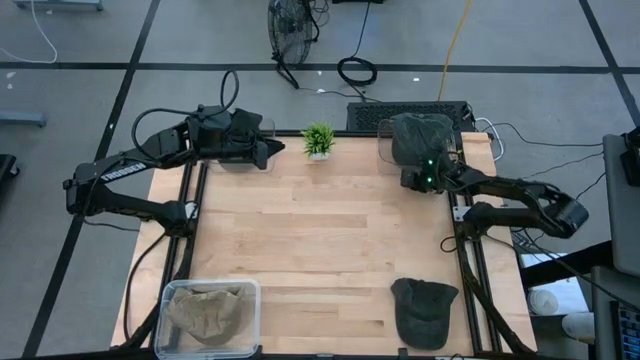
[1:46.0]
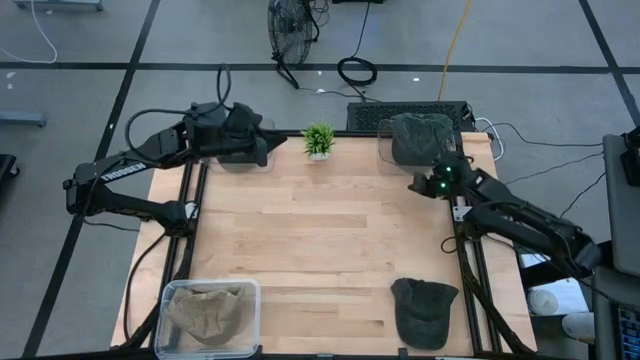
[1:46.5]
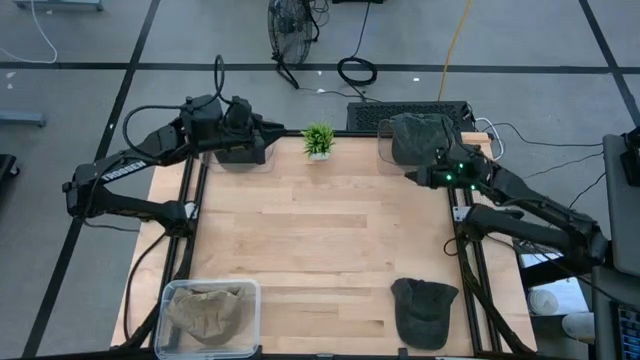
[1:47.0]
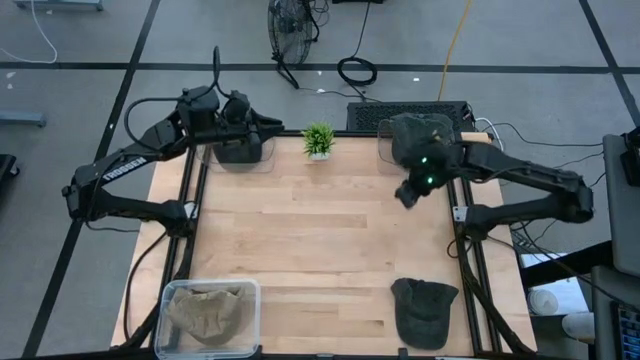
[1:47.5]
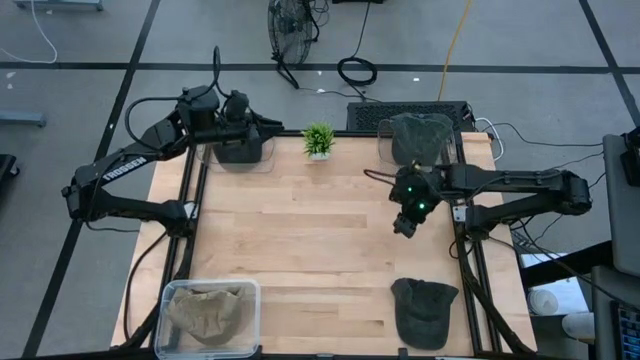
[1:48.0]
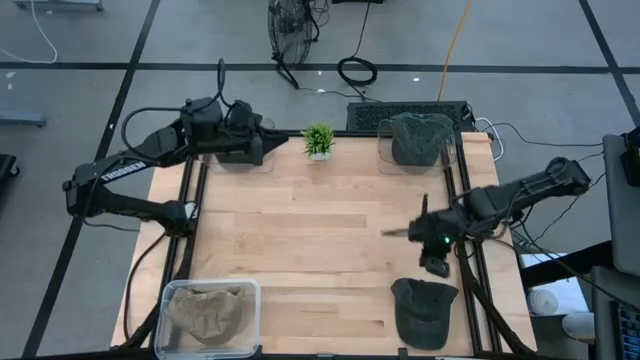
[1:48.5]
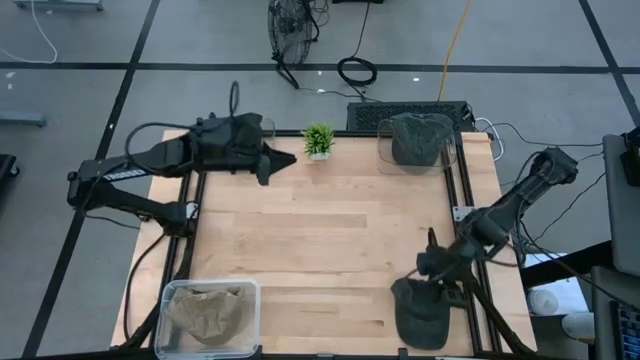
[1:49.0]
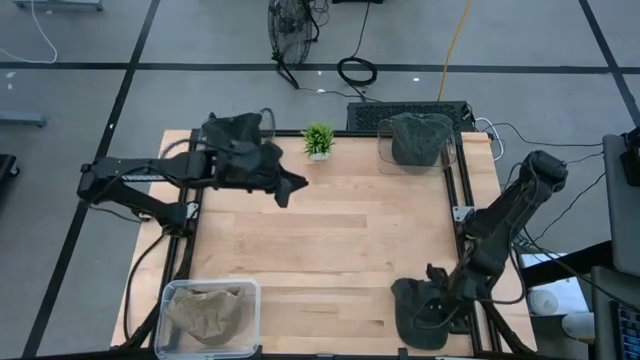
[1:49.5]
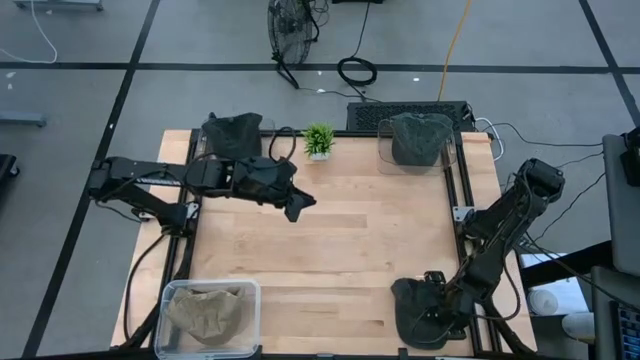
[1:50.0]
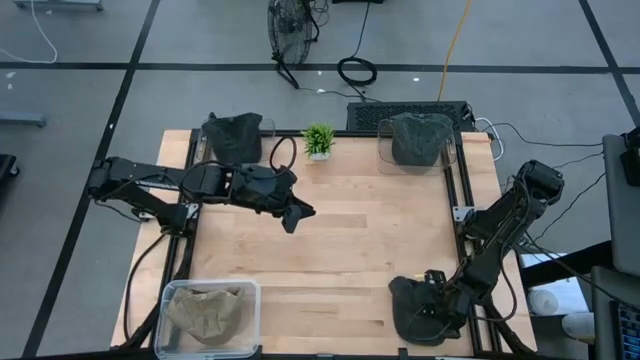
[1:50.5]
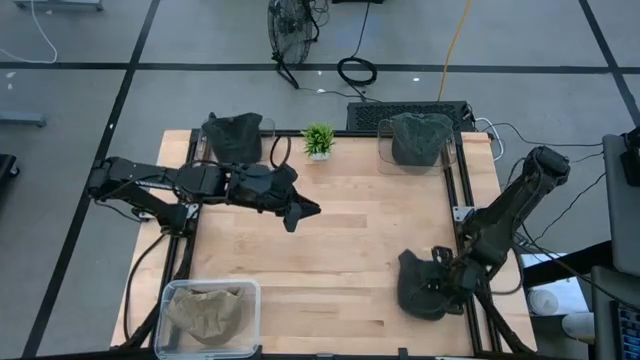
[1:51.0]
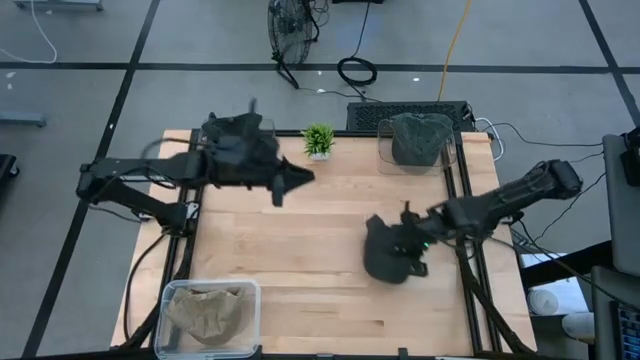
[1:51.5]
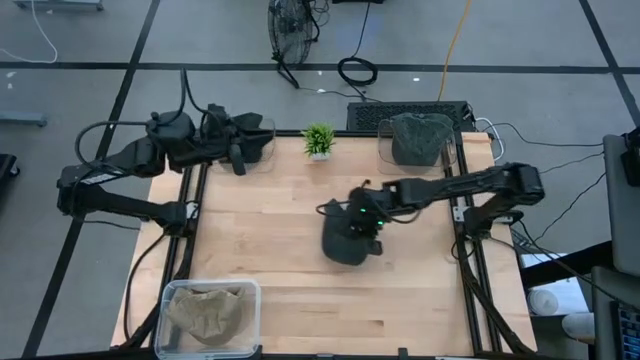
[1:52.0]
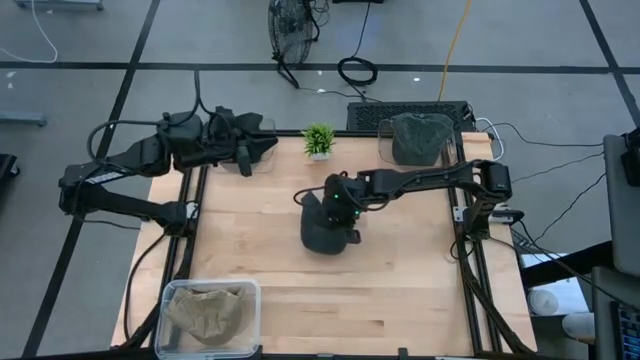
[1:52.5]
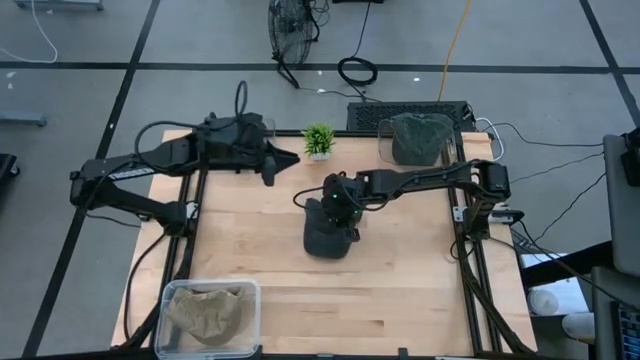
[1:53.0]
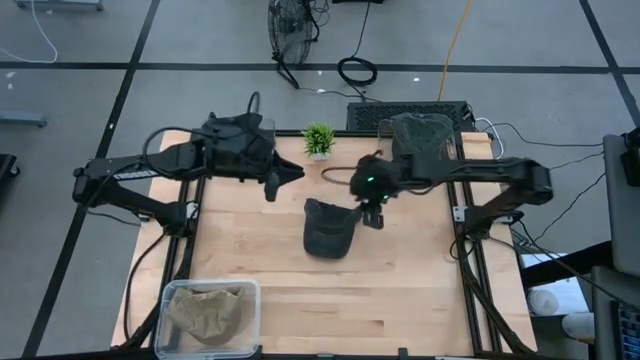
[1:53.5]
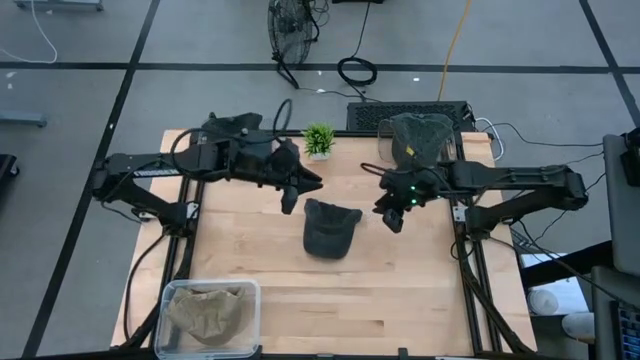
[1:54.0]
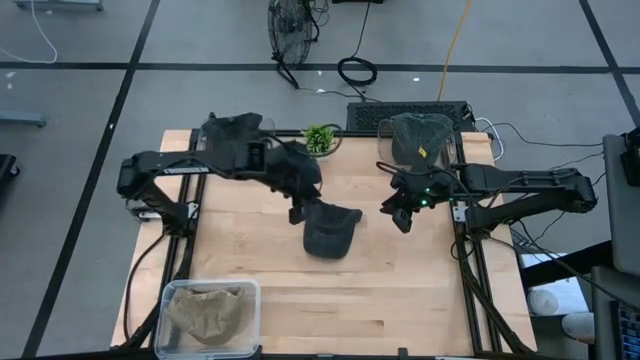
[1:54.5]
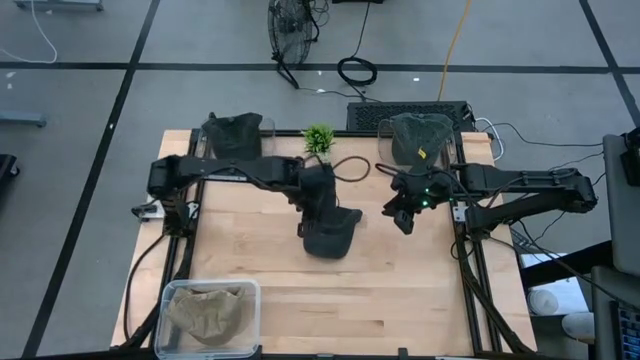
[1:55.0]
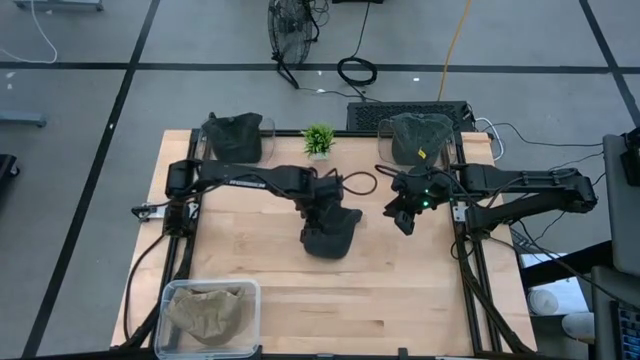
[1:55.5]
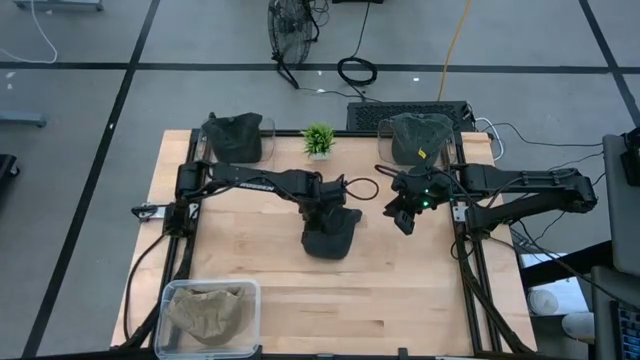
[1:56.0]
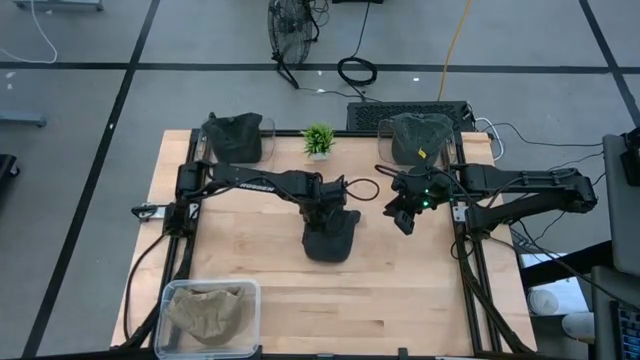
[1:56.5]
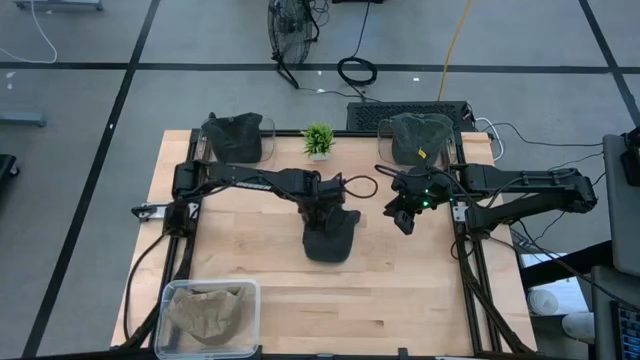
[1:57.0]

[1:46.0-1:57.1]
Task: Pick & Place hat
Put the black cap into the left transparent bin

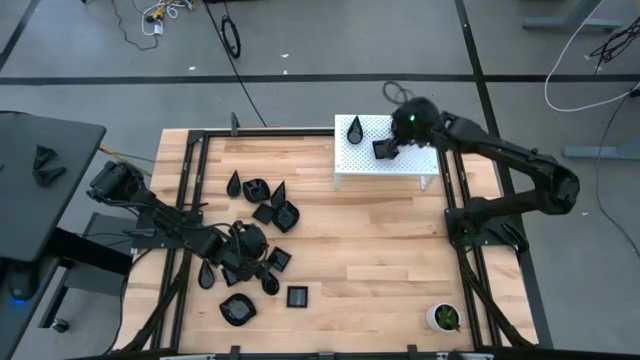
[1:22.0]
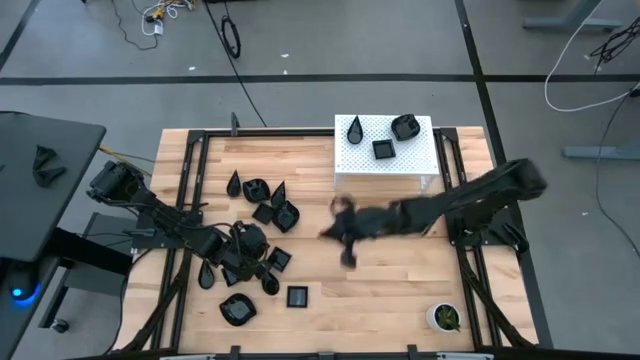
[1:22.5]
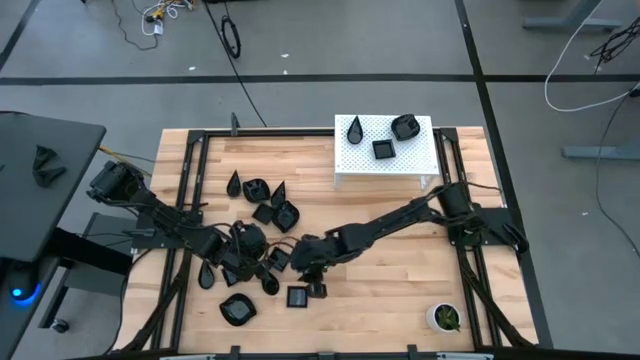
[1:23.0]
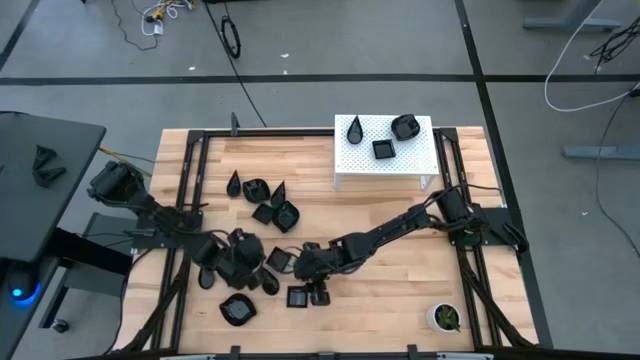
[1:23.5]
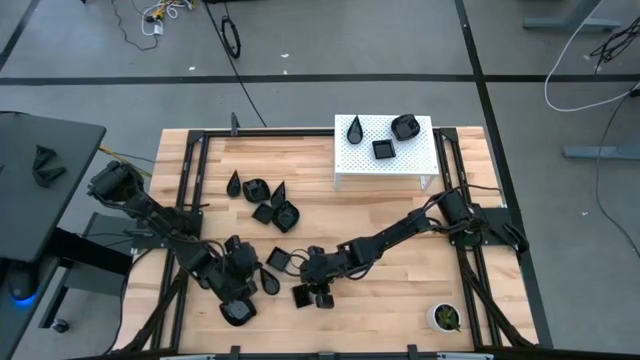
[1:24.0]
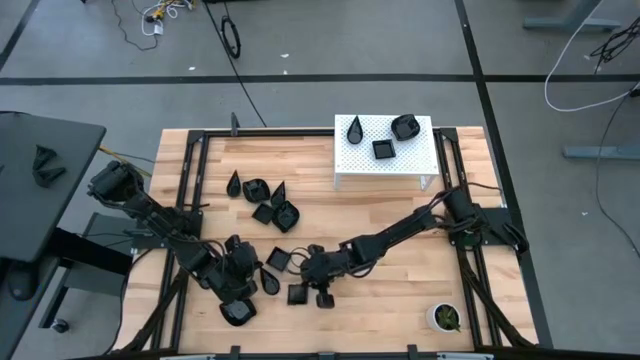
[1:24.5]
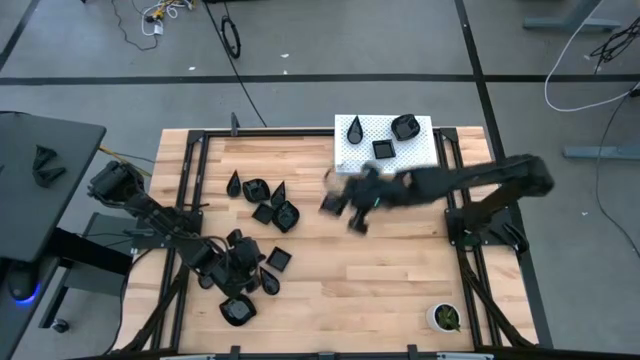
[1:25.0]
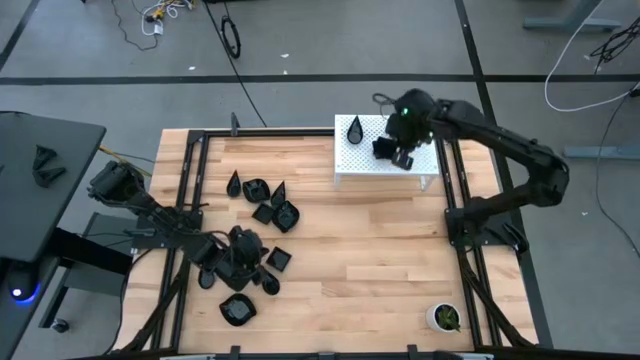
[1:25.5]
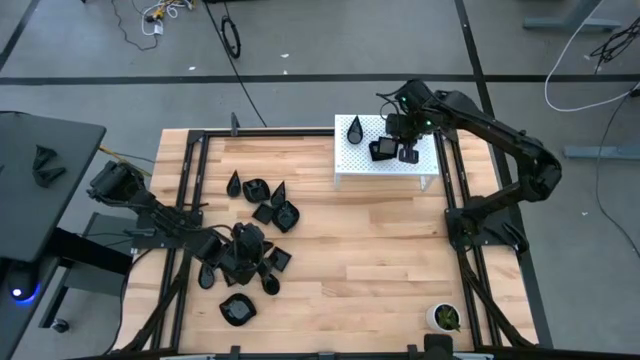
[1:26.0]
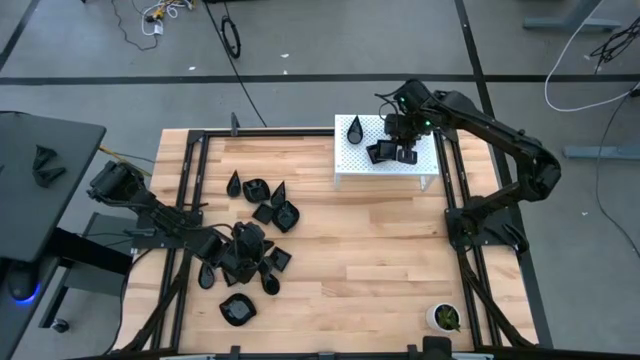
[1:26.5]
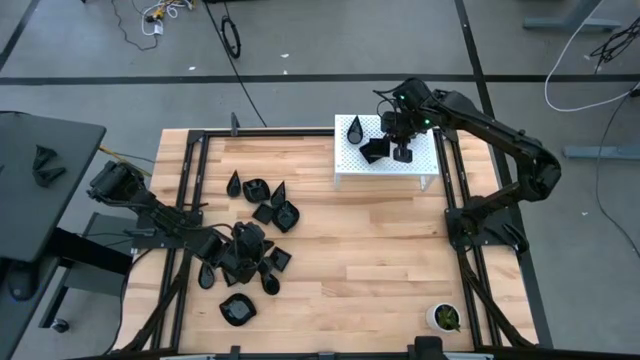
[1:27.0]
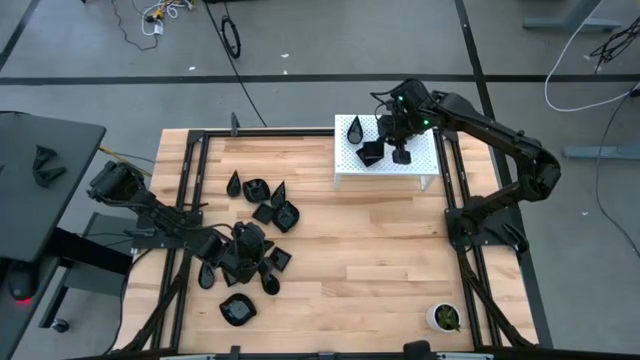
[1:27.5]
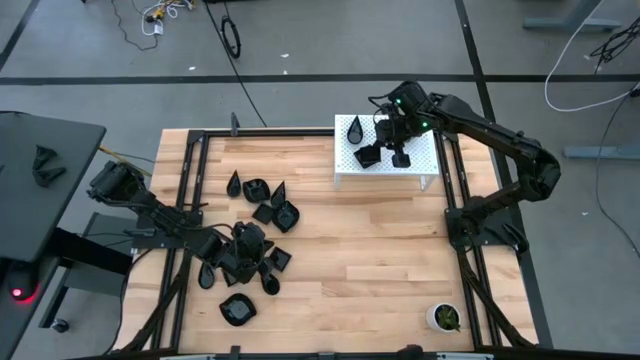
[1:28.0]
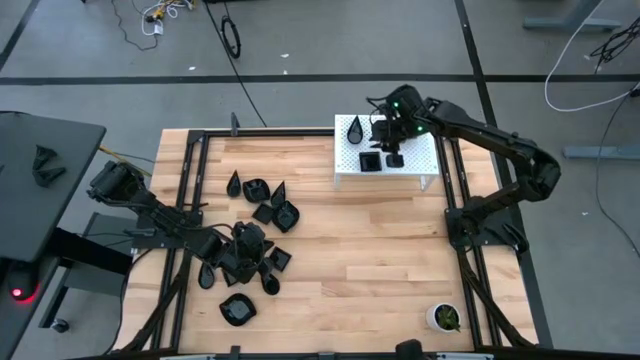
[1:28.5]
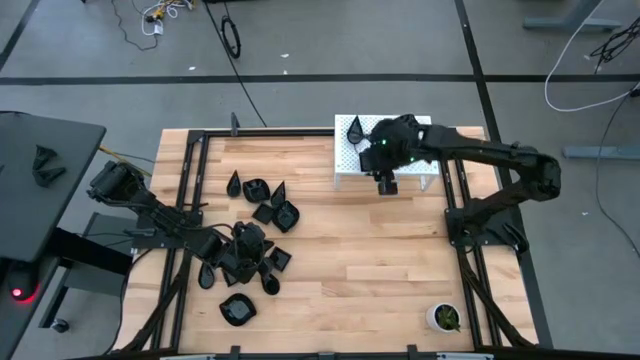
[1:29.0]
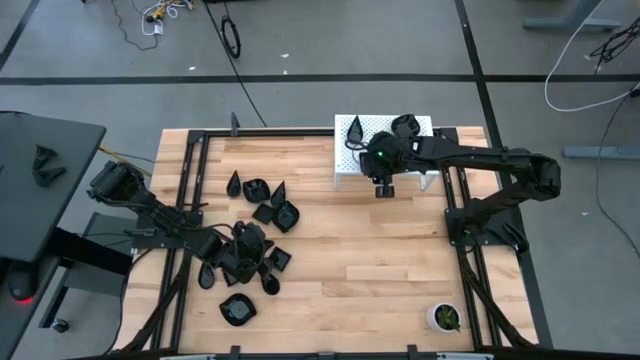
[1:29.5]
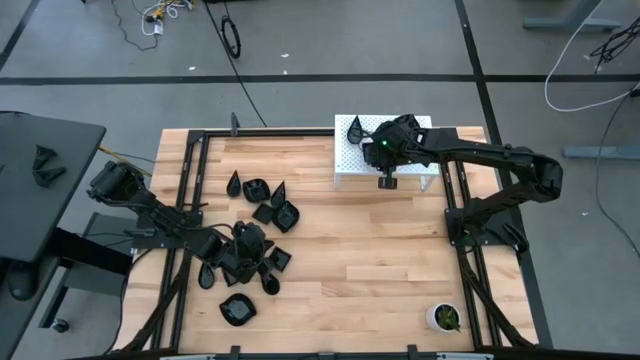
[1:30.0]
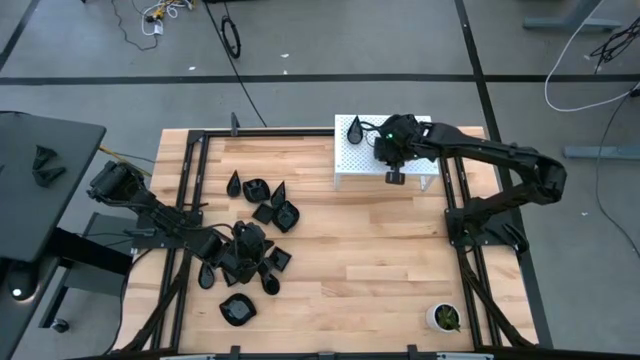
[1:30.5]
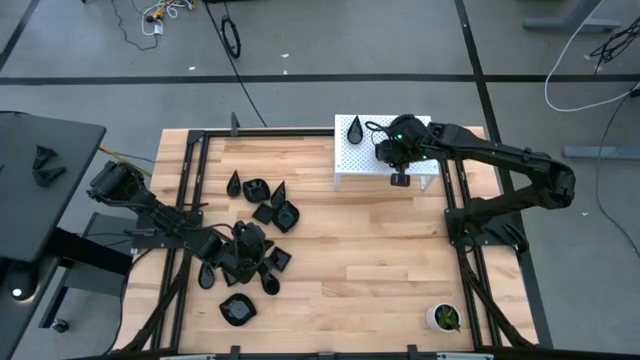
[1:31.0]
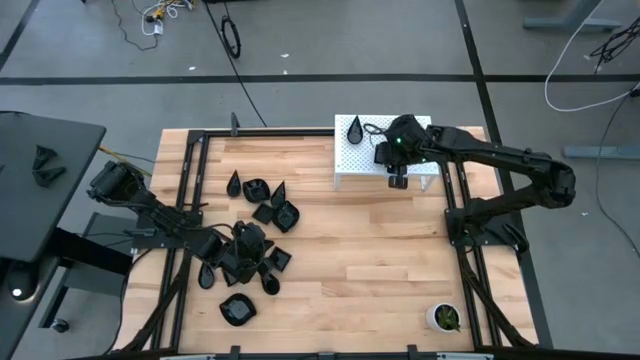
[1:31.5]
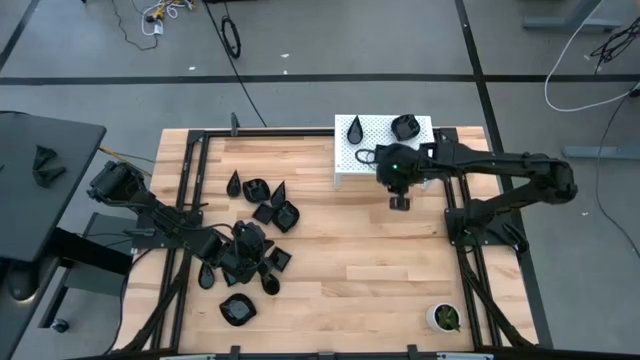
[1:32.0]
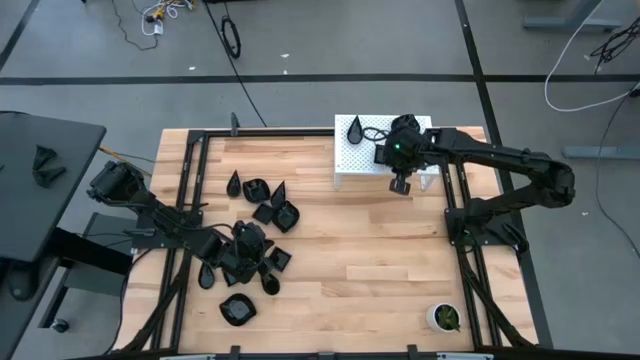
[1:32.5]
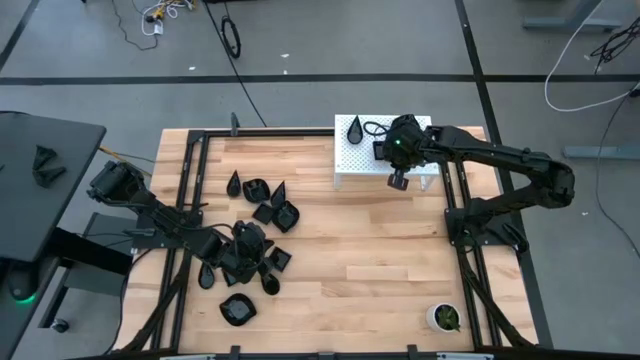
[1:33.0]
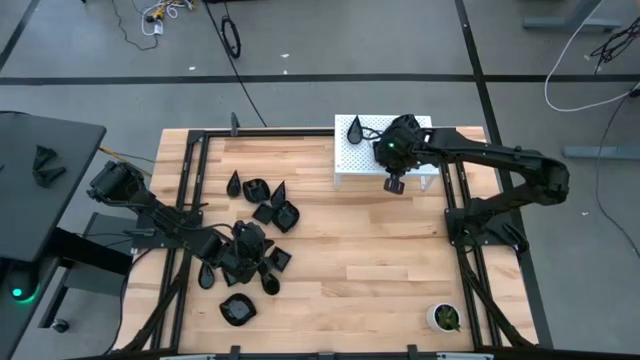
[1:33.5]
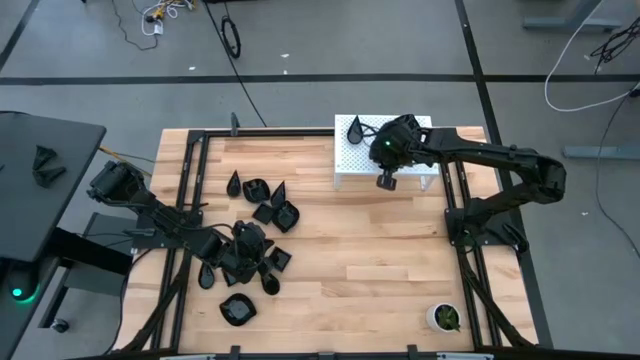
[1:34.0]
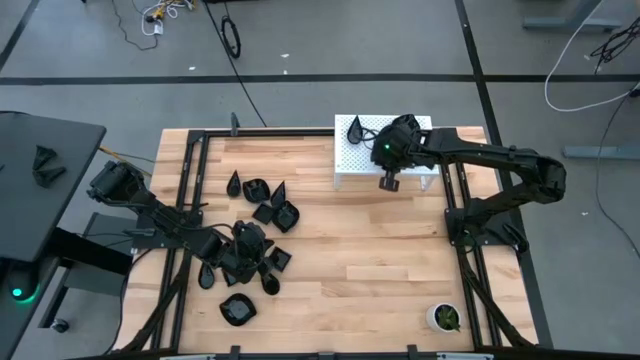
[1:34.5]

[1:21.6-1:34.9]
Task: Pick & Place Mini shaped plates
Stack the black square plate on the black square plate on the shelf
